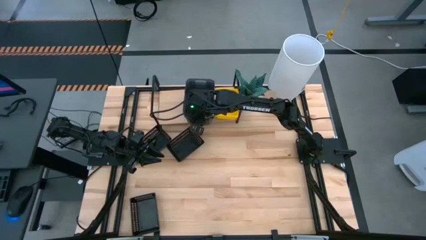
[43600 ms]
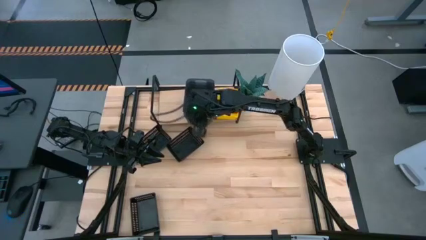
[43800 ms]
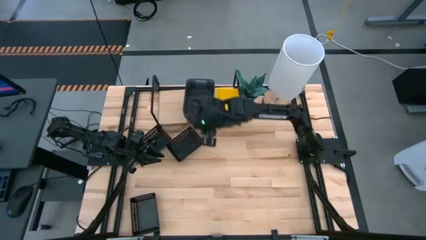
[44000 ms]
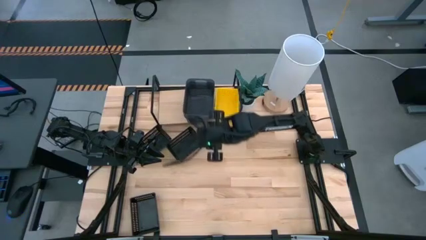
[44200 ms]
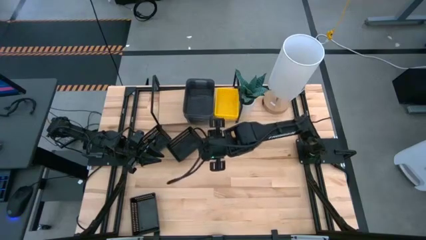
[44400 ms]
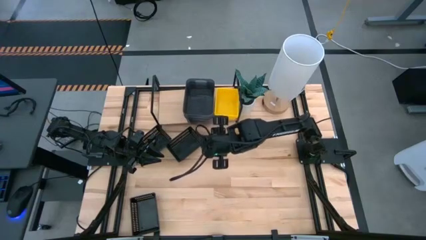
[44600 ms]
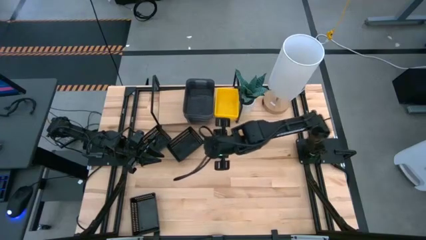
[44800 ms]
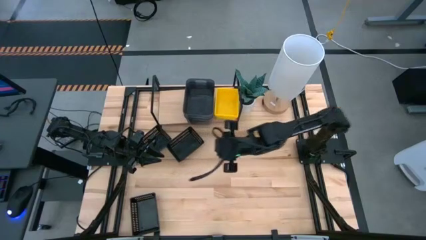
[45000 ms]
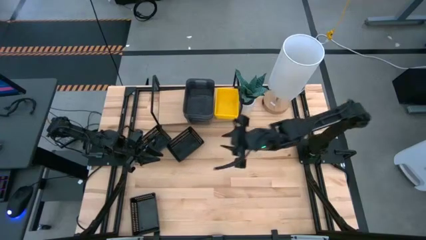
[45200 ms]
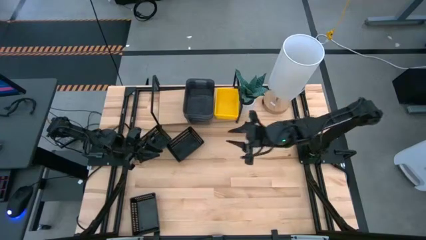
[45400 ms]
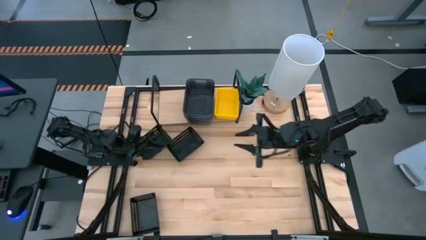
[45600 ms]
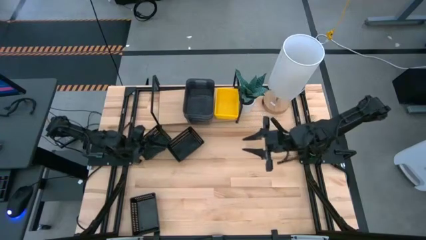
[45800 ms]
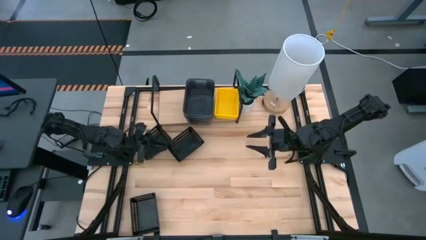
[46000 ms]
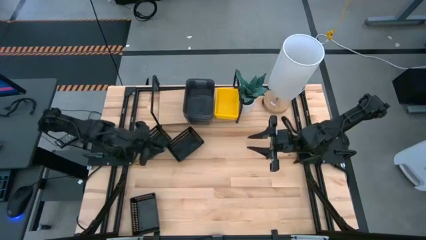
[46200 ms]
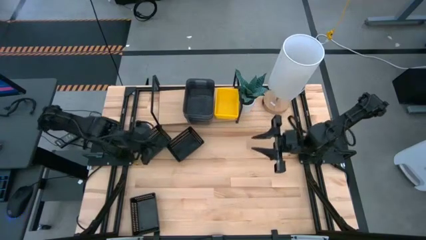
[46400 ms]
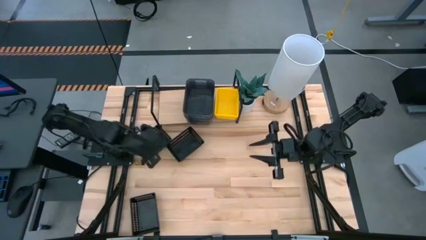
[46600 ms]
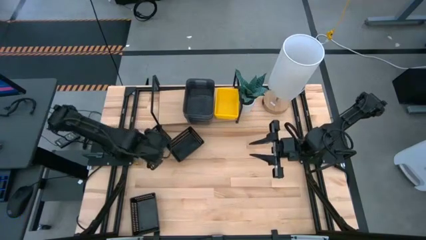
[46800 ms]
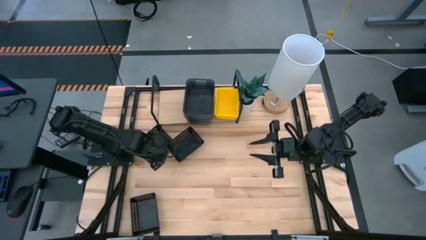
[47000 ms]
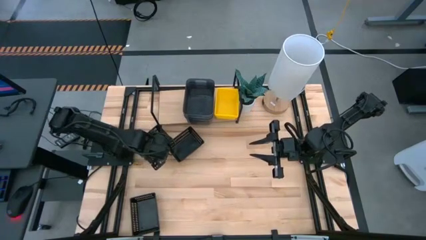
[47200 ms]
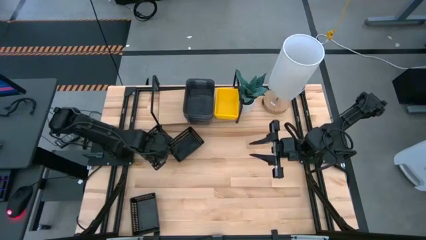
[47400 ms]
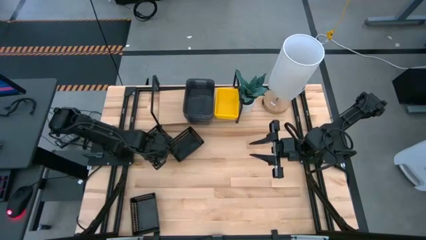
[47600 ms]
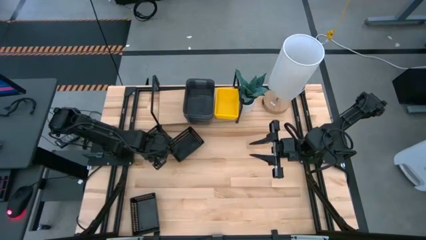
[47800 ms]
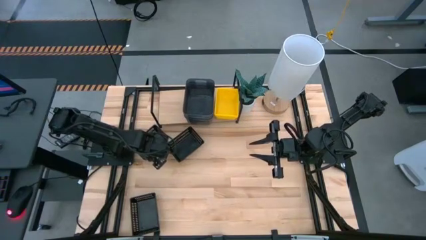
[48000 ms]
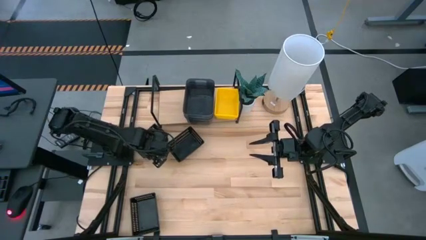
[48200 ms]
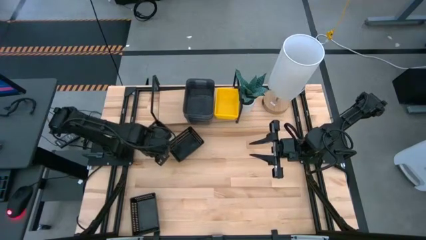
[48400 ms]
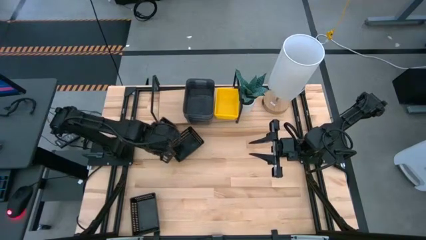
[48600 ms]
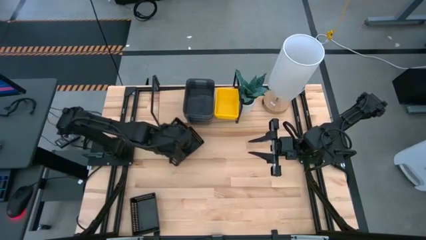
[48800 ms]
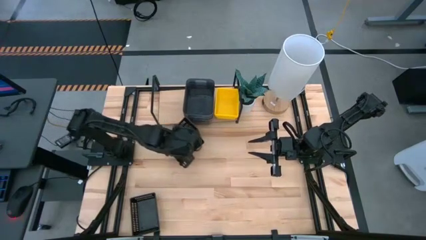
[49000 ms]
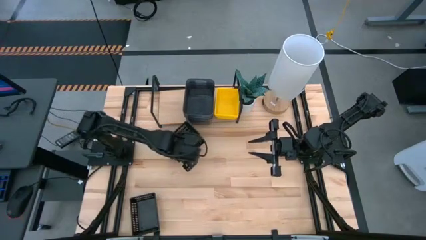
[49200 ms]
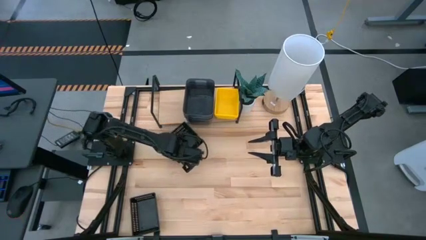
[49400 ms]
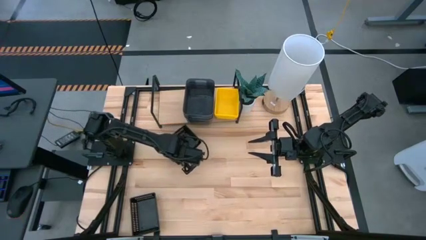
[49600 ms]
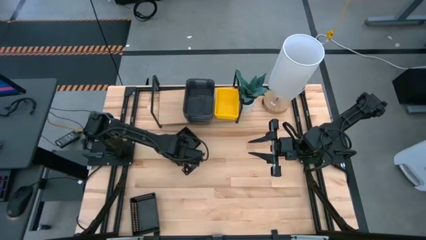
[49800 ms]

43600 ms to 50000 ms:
Task: Stack baskets on shelf by color
Stack the top left black bin on the top right black bin

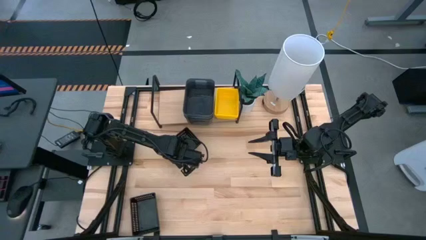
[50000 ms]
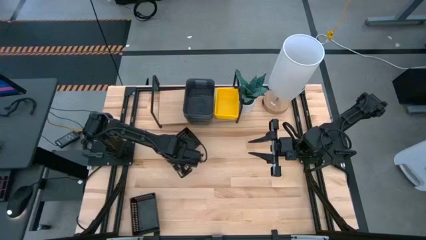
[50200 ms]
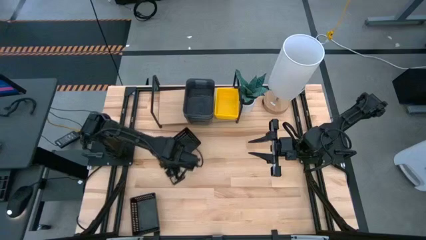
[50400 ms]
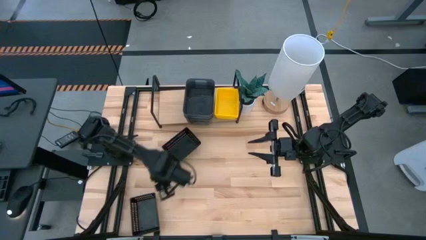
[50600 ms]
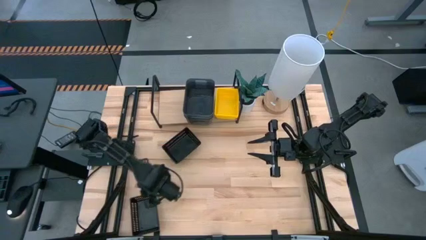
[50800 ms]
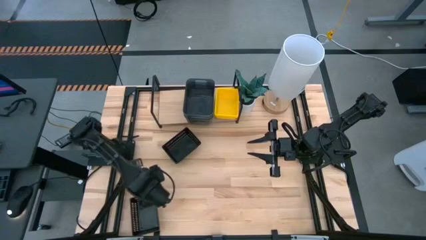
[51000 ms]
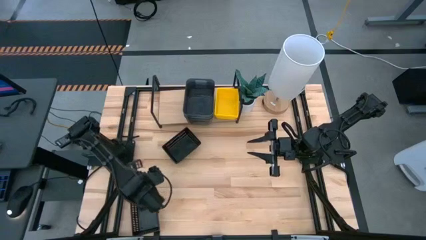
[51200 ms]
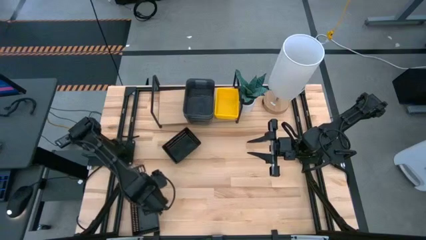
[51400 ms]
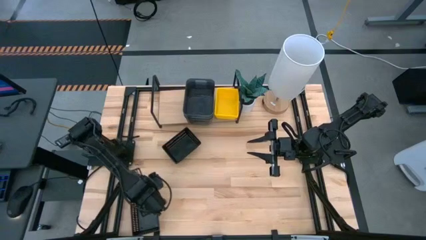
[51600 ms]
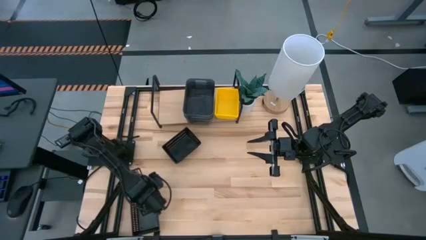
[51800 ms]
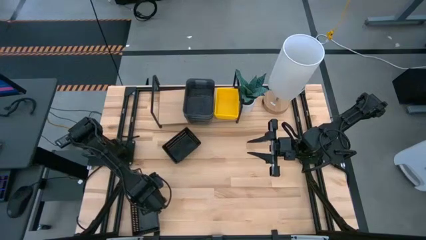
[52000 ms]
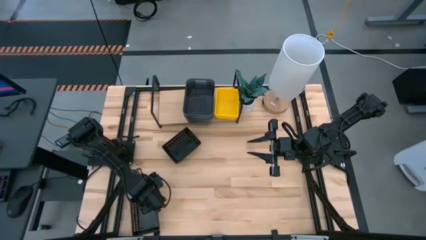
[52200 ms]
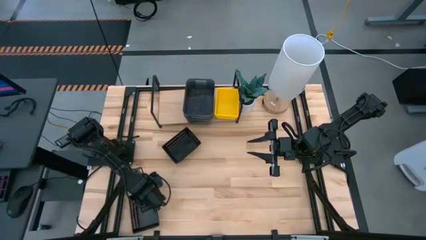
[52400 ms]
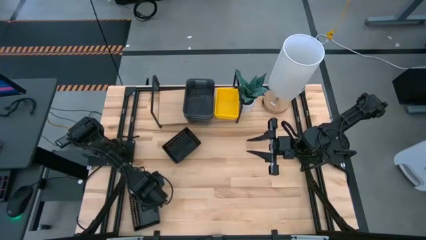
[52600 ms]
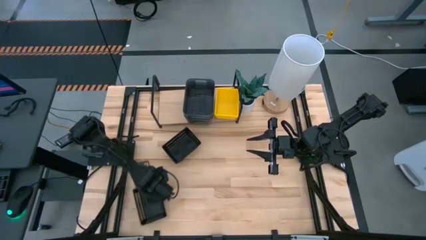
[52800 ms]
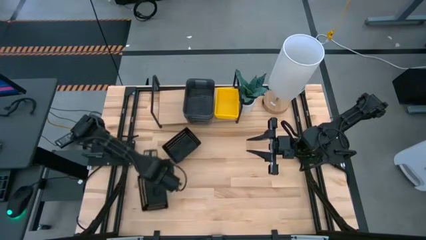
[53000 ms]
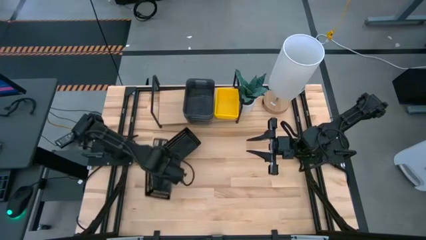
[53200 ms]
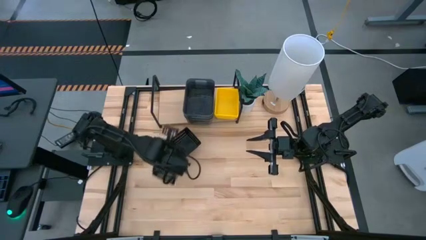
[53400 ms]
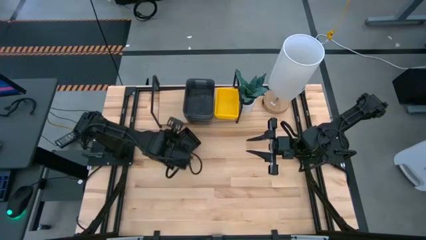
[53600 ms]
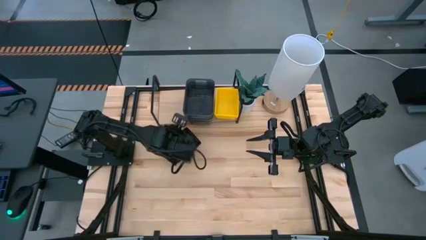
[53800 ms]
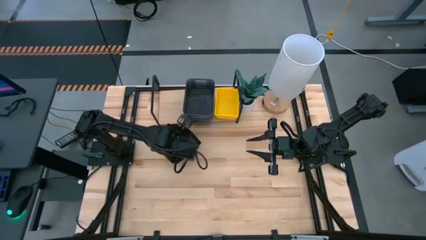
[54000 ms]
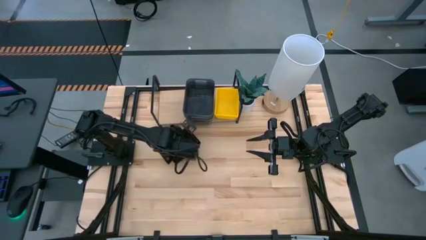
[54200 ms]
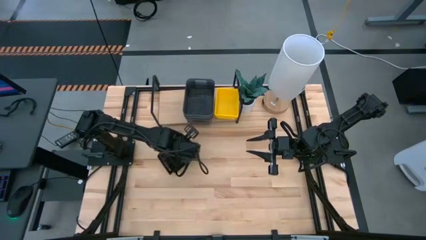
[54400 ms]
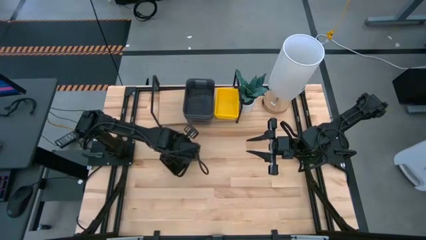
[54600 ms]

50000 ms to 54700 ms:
Stack the bottom black bin on the top black bin

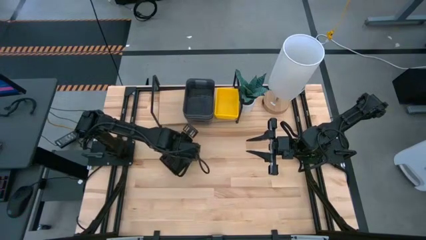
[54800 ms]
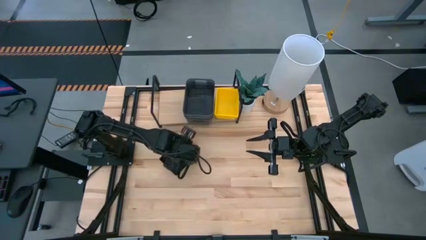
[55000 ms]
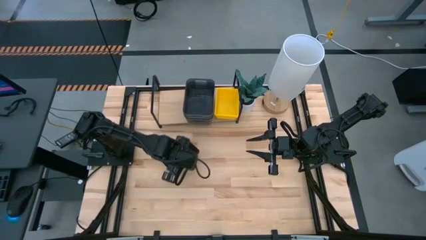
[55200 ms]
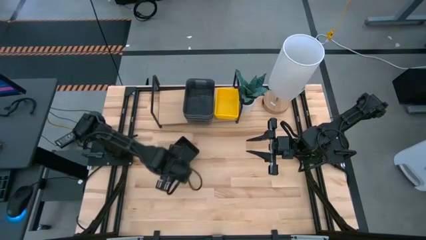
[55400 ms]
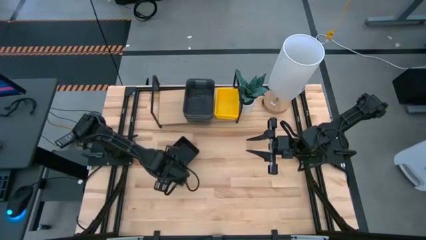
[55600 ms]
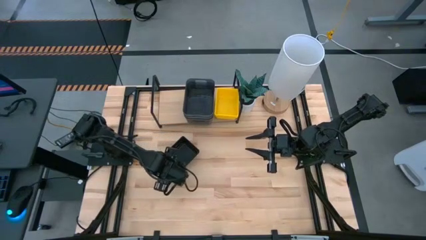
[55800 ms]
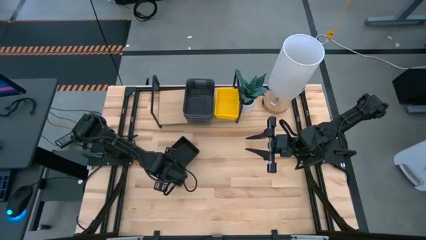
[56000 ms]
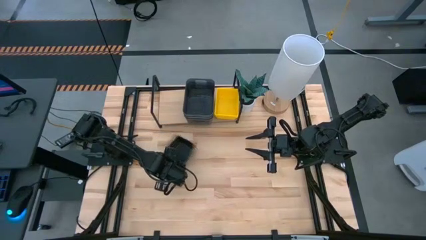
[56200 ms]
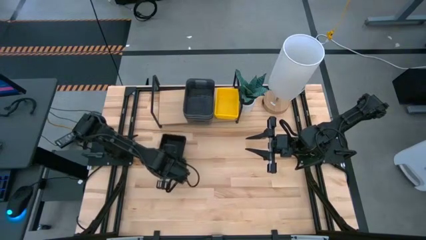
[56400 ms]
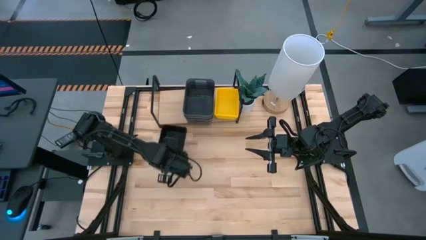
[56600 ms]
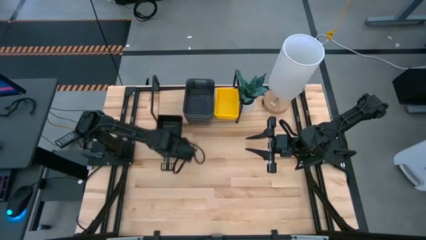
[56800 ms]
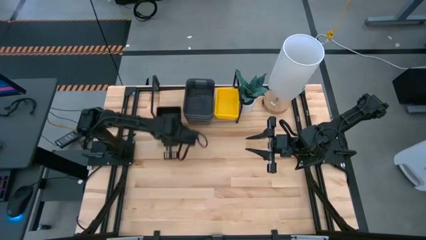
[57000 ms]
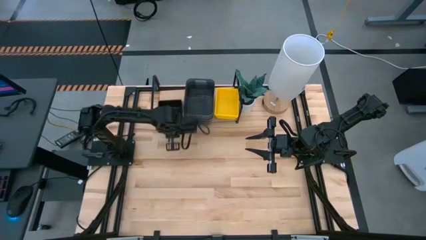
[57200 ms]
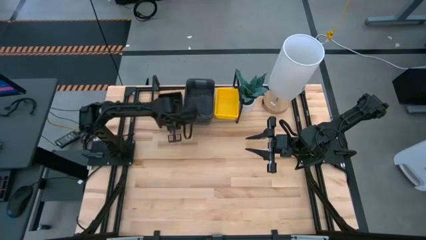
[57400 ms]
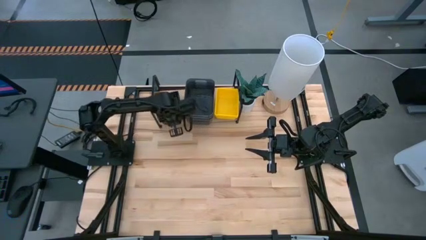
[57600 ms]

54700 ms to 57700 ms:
Put the stack of black bins on the shelf

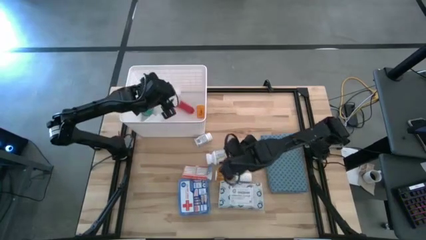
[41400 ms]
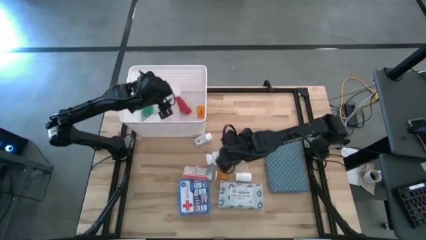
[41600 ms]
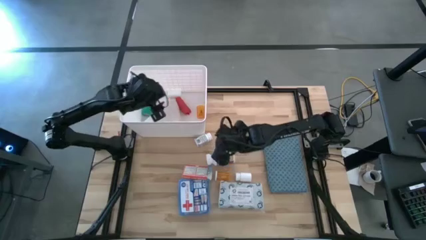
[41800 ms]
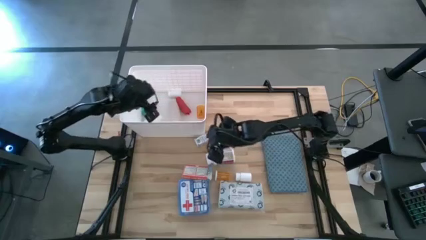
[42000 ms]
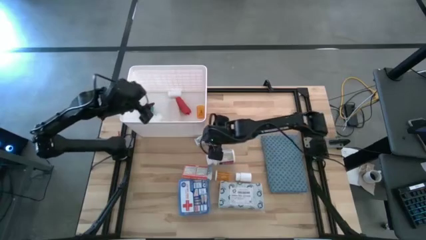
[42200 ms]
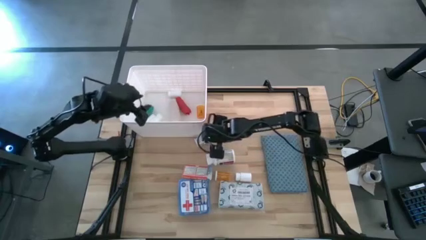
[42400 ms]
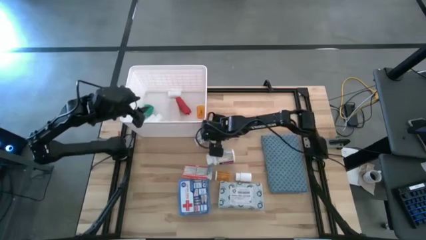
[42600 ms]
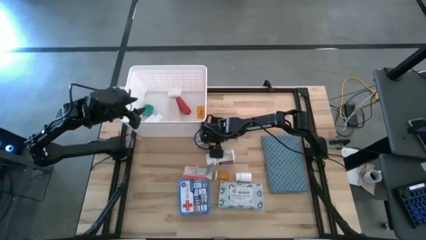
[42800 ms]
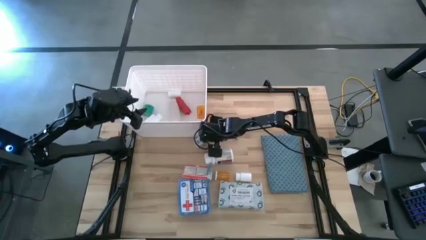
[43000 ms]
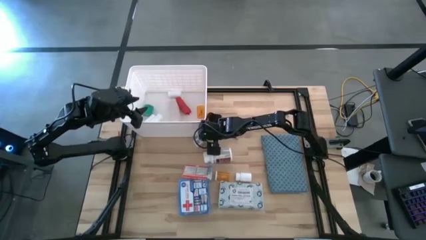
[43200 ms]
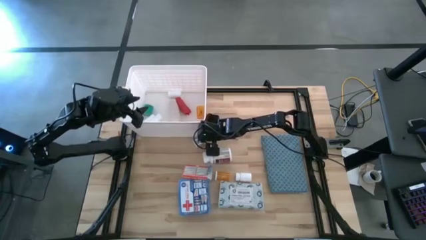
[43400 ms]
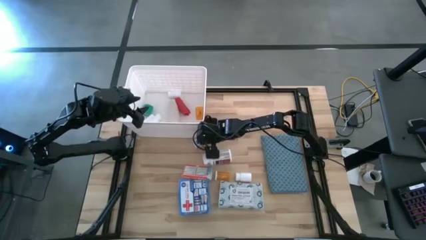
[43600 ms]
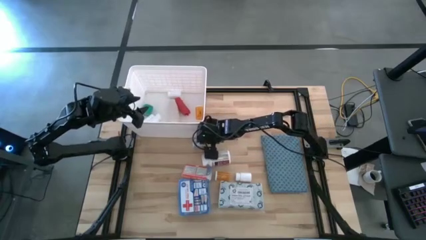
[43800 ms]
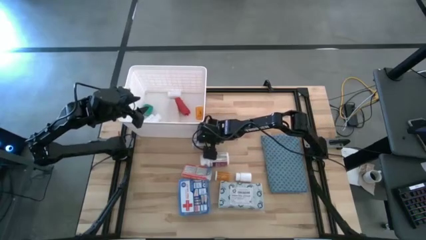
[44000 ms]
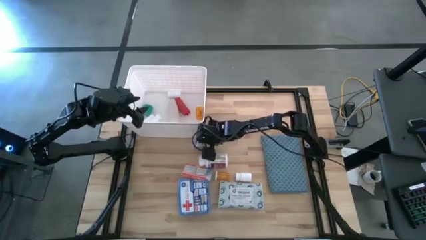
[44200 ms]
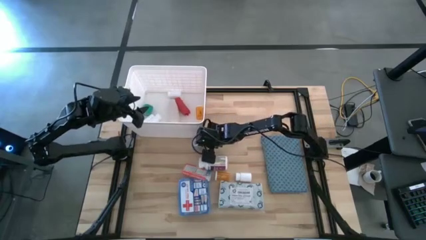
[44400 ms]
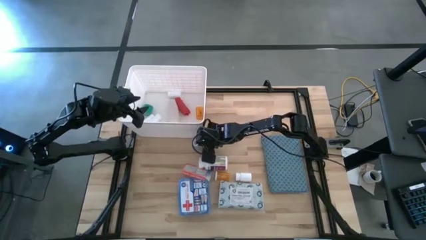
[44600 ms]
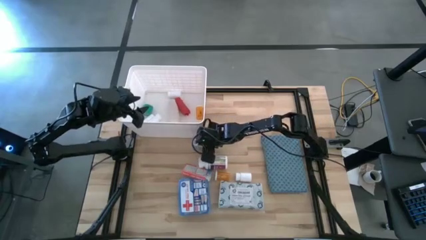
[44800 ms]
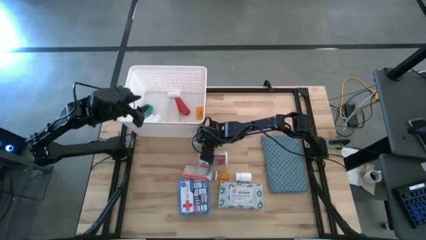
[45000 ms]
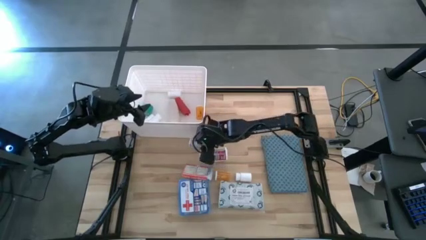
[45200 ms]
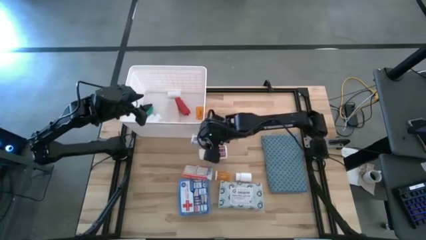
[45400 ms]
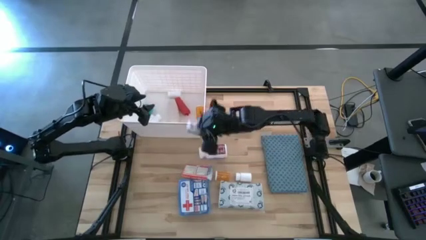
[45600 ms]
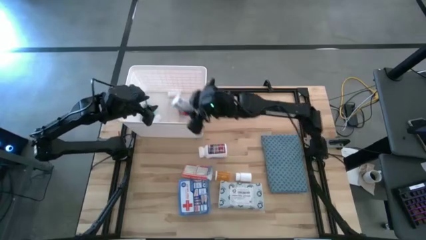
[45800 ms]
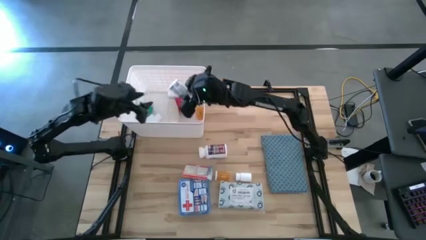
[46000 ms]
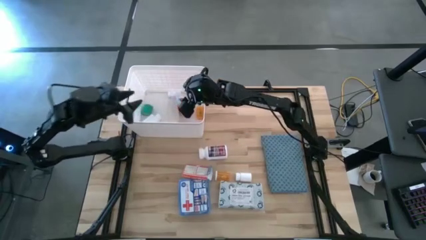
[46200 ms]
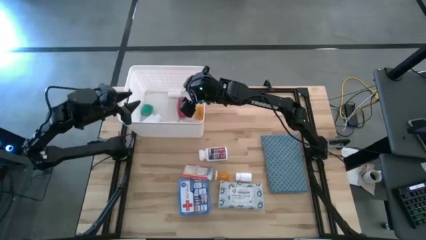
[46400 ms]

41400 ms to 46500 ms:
Task: Pick & place medical supplies in basket/bin
Put the white blue pill bottle into the white bin
